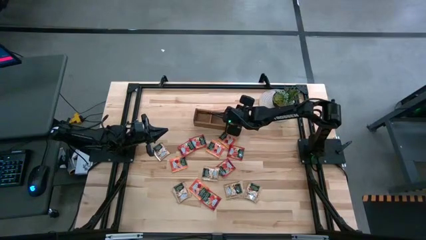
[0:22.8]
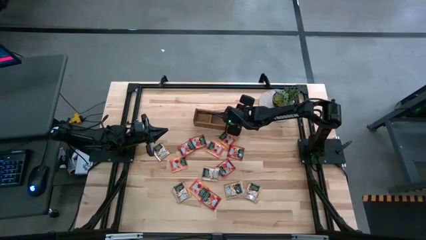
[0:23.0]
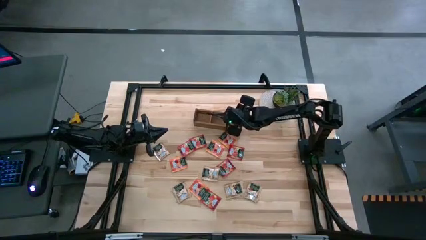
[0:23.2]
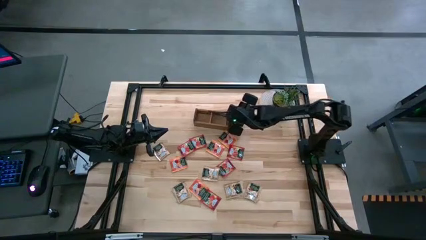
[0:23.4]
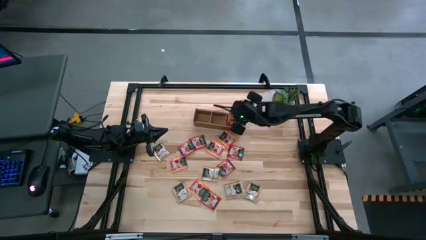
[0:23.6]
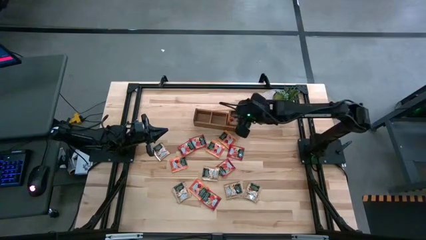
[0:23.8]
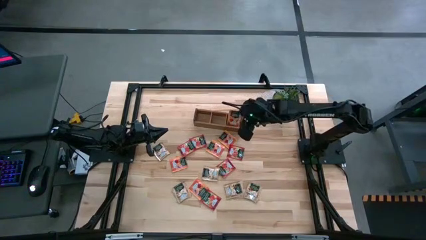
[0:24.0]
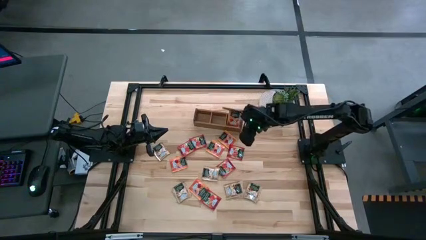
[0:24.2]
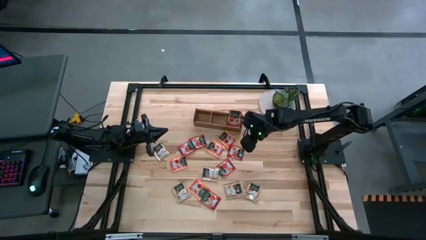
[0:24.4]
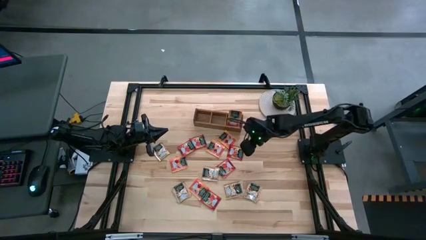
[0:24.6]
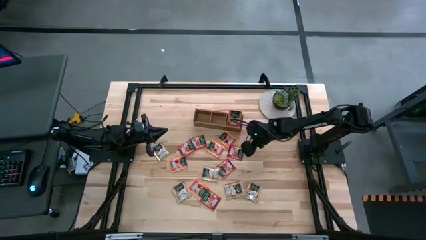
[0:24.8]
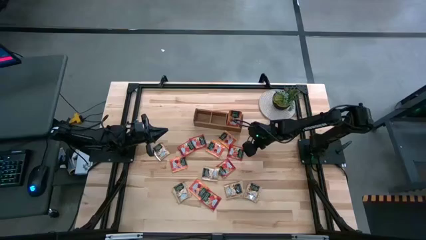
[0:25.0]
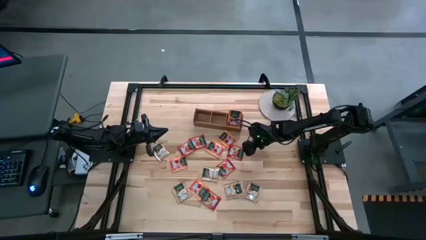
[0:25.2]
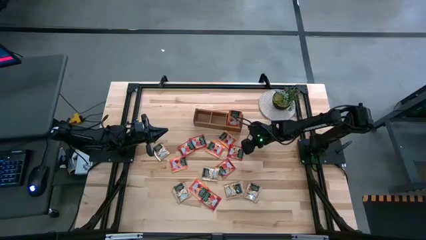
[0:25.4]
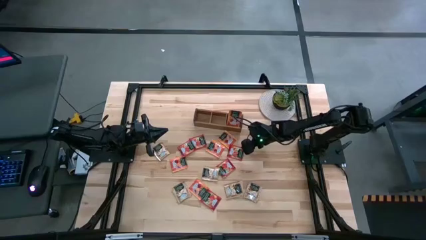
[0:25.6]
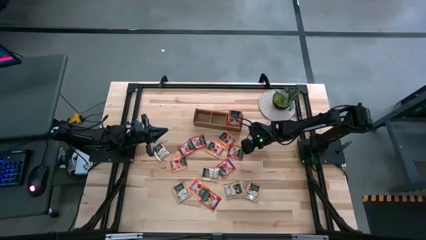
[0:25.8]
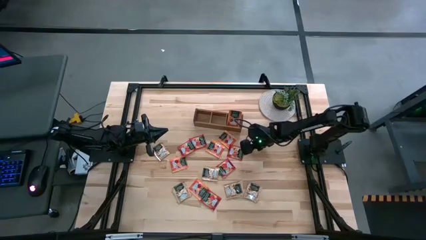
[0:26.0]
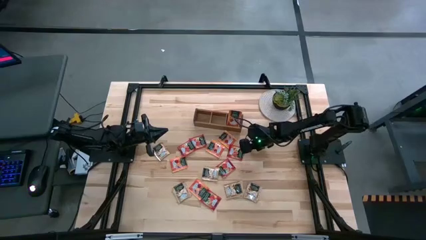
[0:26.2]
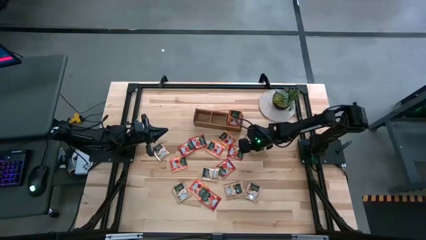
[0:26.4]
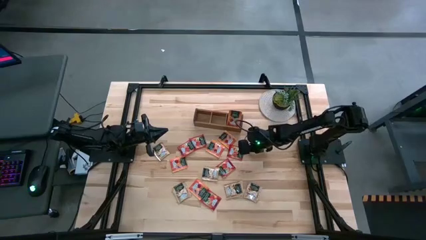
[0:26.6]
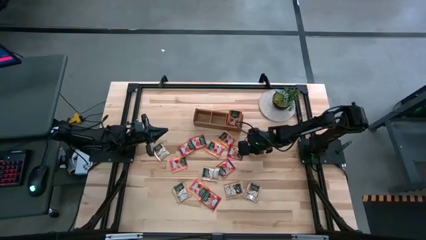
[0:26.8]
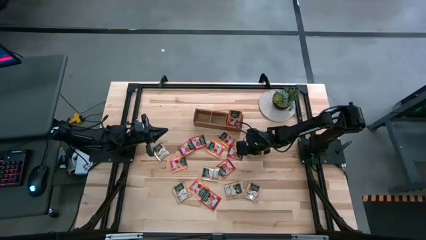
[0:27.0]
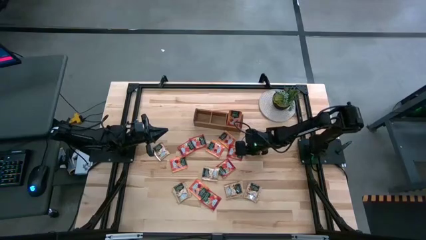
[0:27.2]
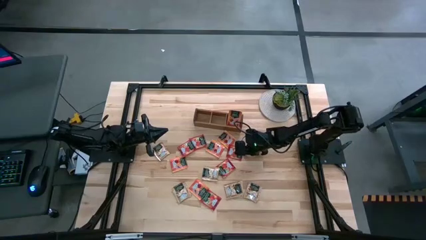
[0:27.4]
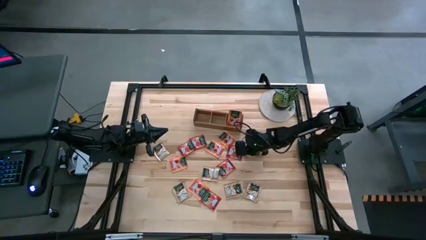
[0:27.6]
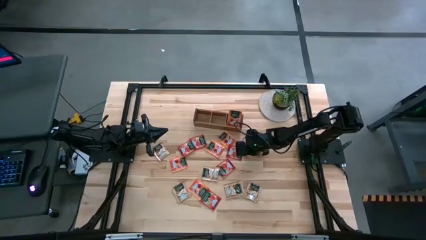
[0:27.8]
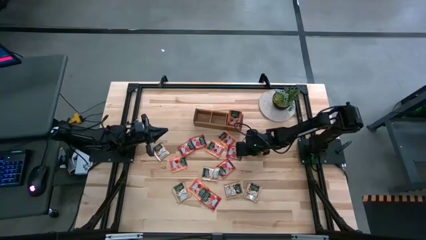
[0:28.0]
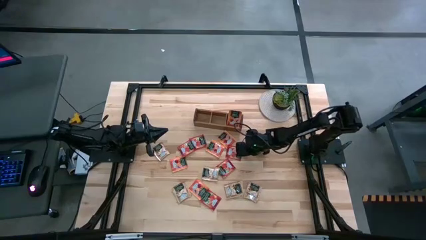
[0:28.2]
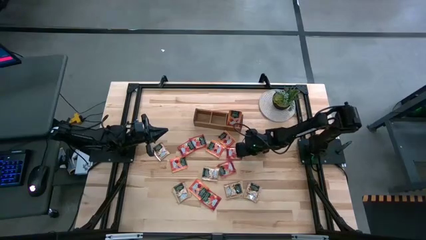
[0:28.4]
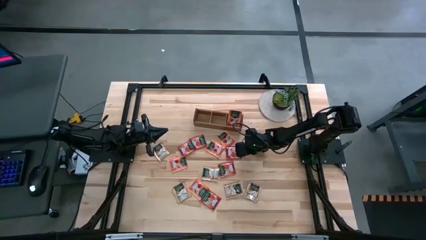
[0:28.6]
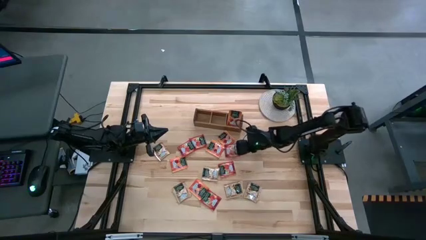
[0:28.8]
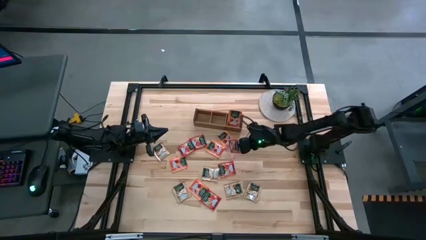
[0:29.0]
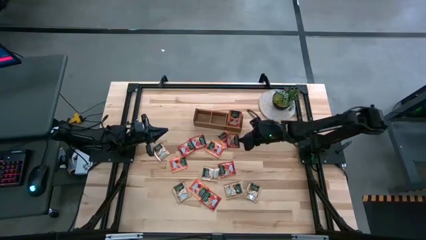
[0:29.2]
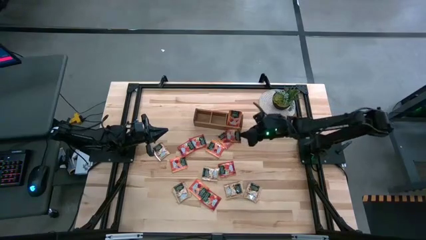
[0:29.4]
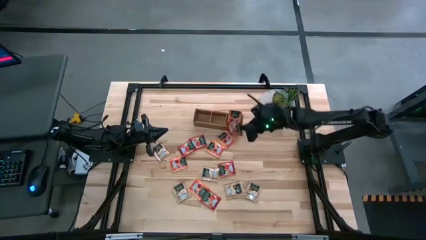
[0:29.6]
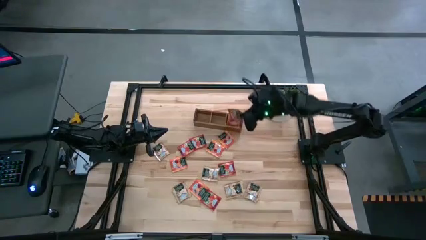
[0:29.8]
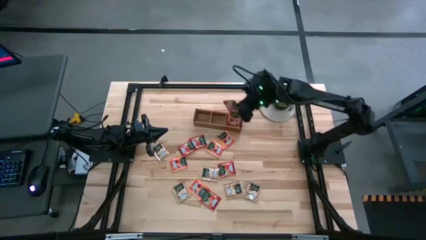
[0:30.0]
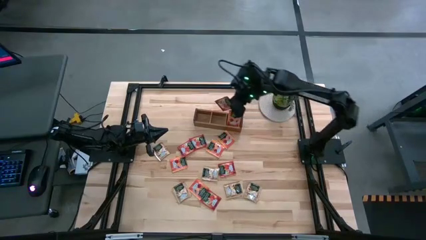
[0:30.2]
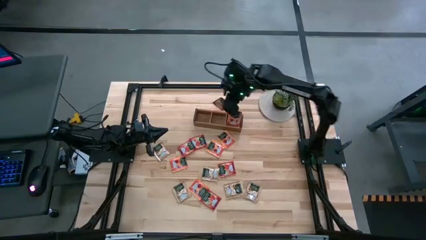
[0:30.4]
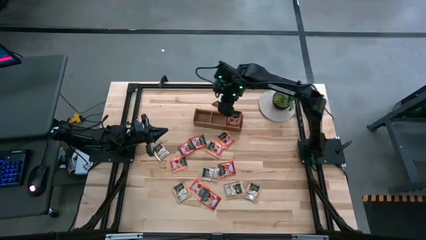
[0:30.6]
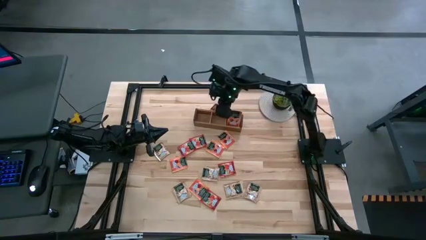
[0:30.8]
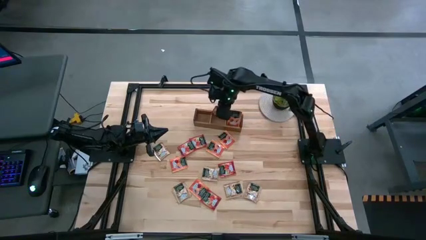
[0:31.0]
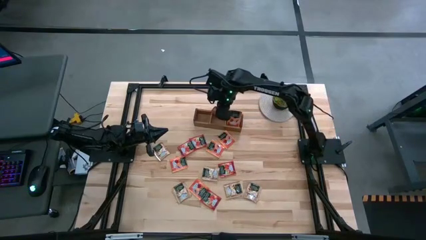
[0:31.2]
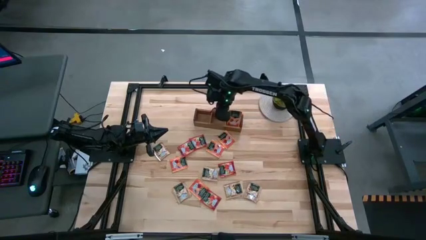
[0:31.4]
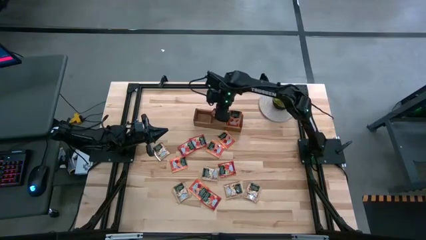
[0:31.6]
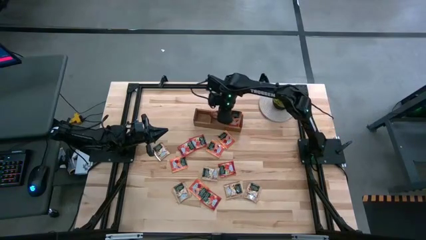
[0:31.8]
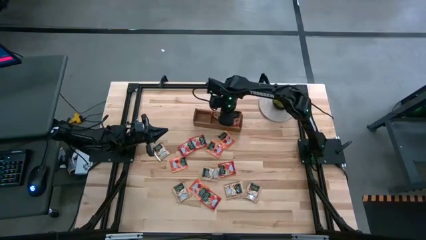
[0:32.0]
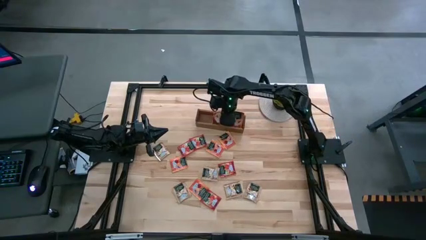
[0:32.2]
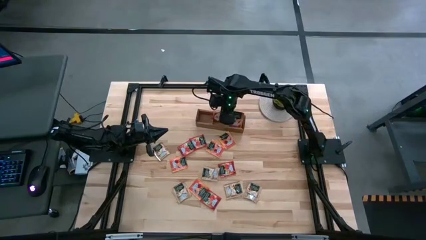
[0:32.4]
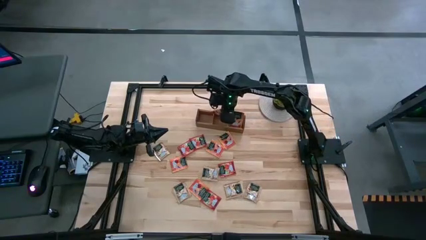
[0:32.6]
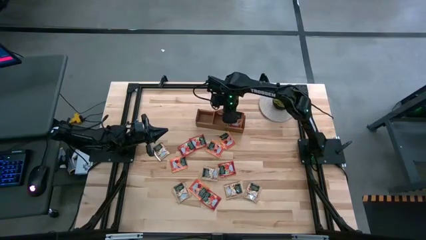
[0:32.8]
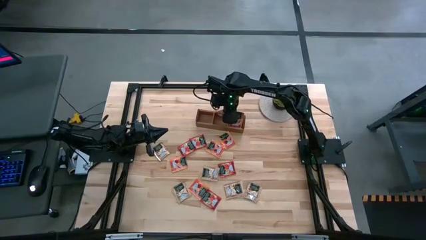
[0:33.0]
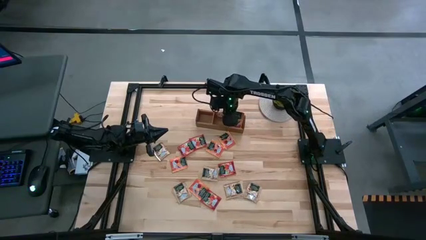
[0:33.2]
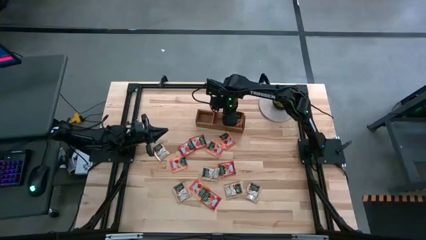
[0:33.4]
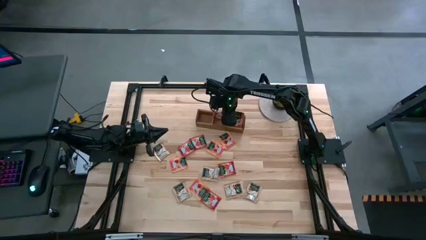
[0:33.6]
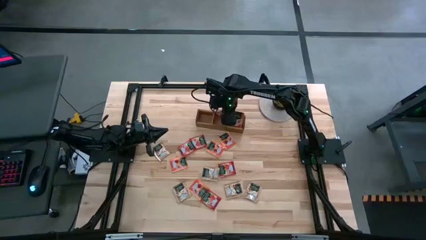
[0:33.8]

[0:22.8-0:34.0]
Task: Pick & Place Tea
Put the red tea bag into the middle section of the wooden organizer

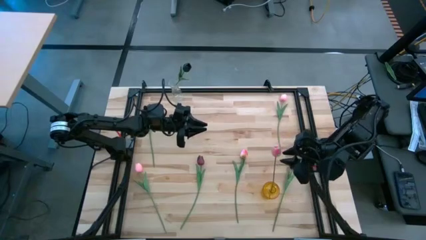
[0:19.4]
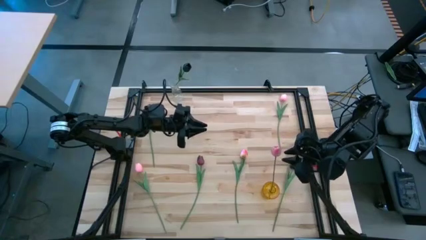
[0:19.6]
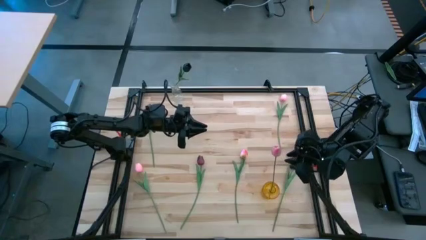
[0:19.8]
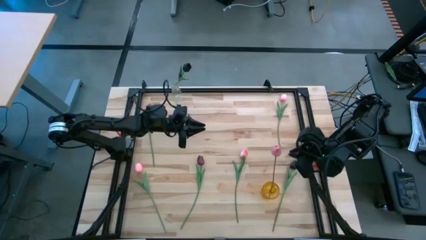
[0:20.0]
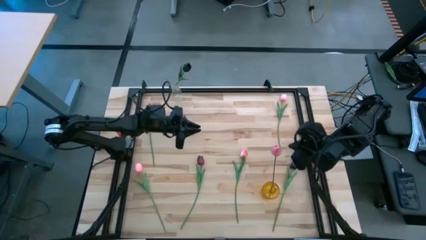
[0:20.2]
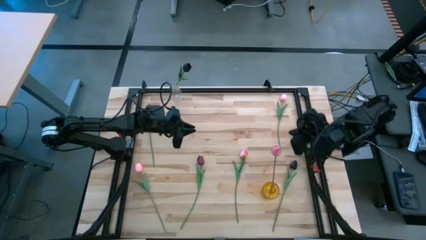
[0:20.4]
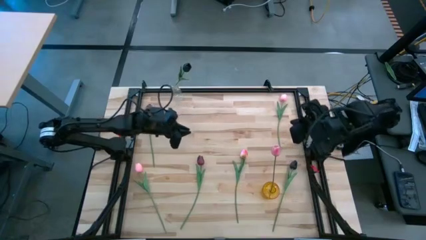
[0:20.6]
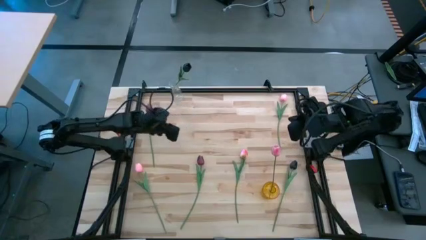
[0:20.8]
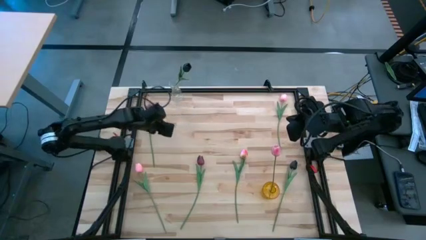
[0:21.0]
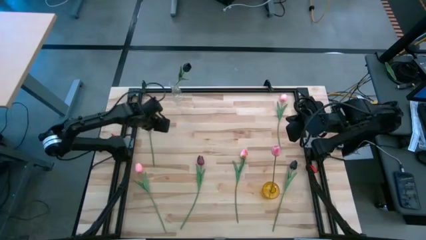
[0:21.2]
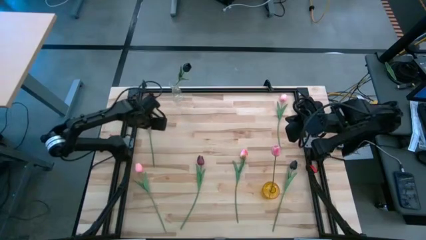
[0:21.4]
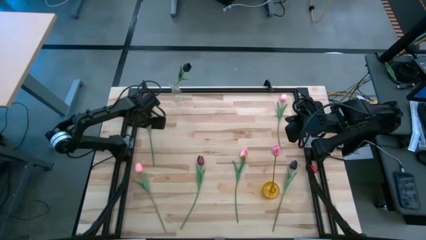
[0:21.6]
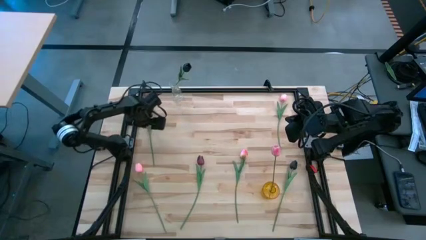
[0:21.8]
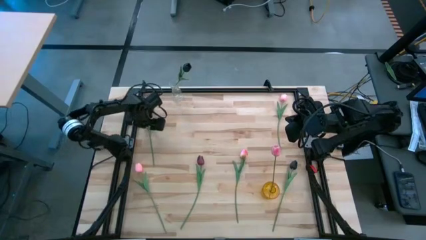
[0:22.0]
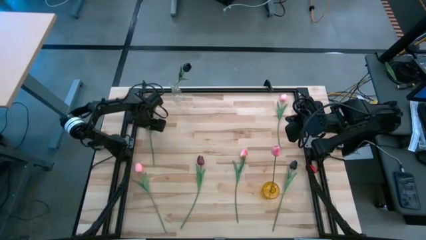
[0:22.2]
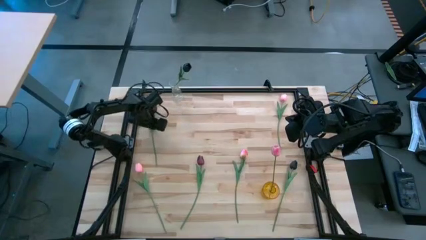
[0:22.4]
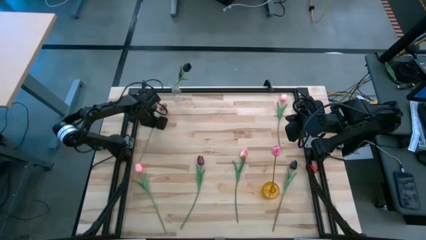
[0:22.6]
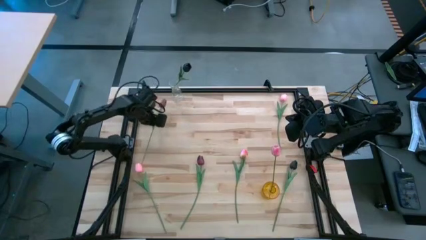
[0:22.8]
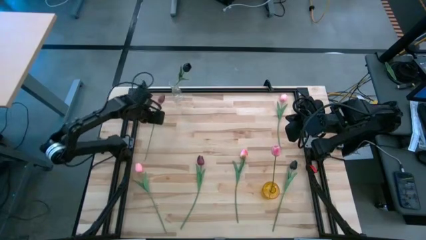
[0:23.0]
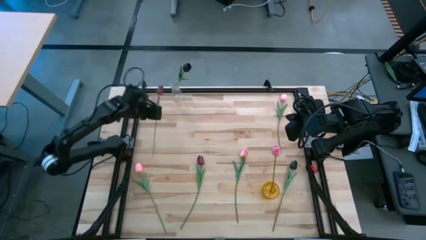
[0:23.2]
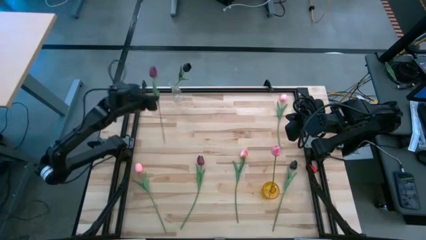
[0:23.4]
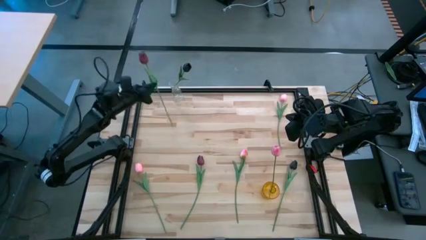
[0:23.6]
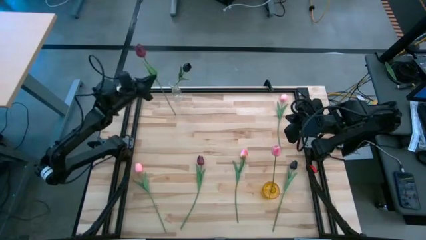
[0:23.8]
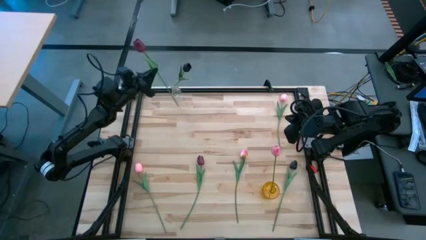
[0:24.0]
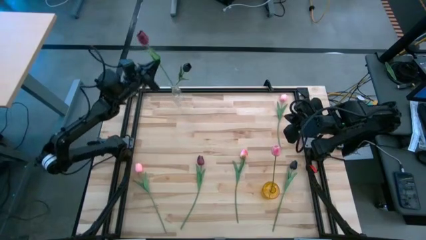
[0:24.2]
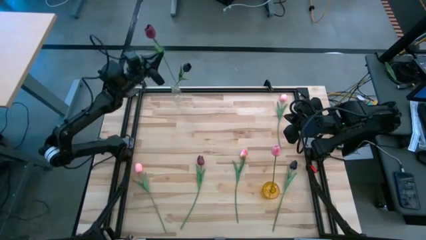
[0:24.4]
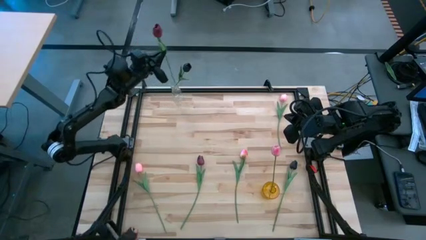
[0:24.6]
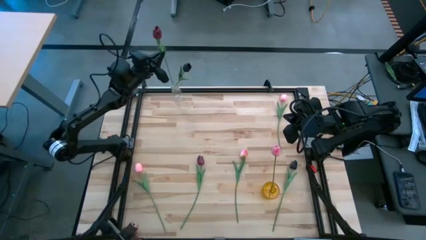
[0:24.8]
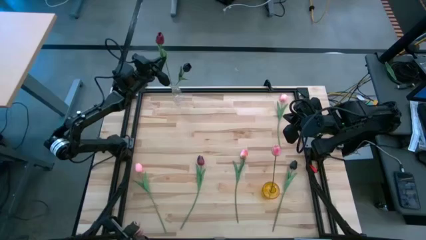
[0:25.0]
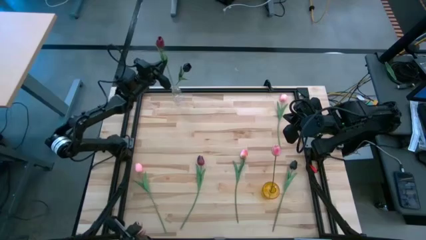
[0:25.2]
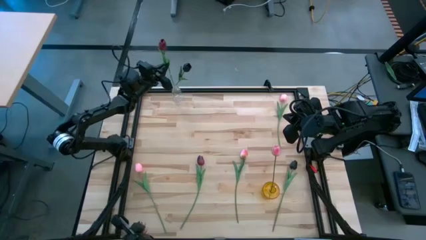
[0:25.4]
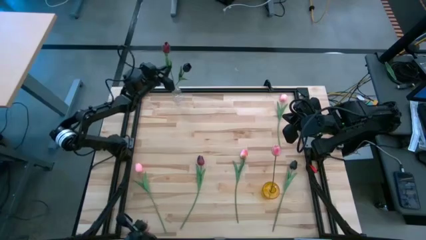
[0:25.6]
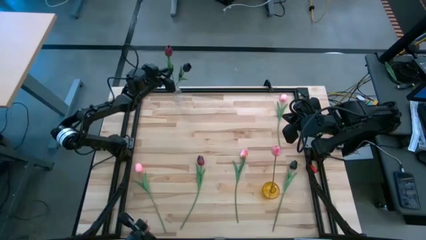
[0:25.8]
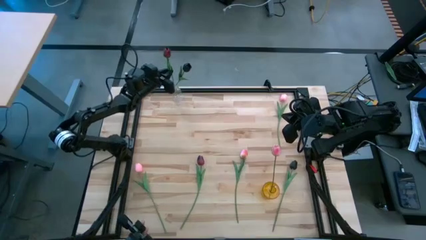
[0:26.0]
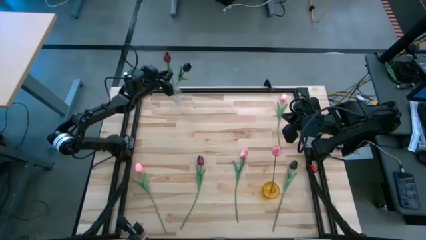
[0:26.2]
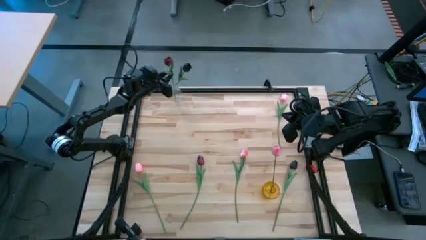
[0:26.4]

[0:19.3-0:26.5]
Task: Sort flowers into vase by color
Put the top red flower into the transparent flower vase
